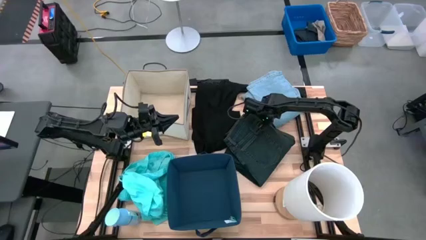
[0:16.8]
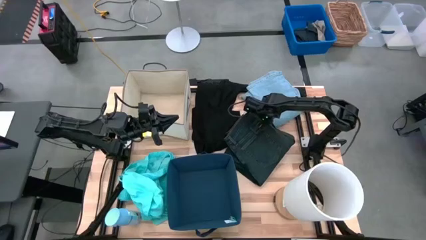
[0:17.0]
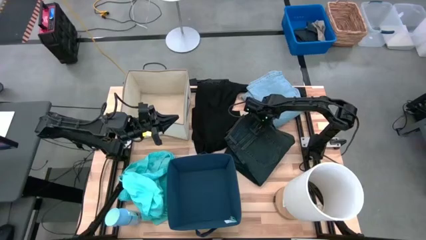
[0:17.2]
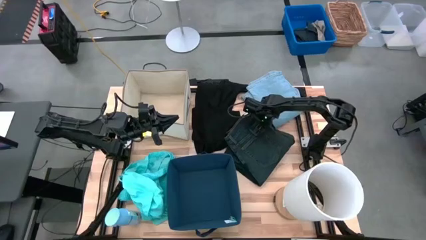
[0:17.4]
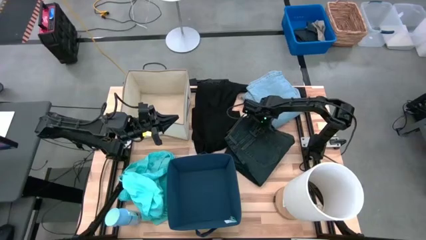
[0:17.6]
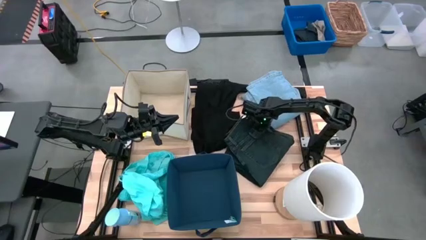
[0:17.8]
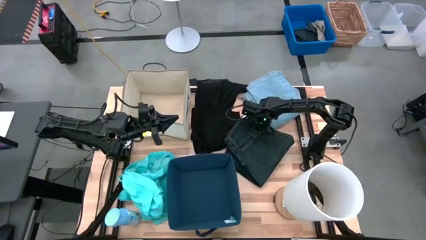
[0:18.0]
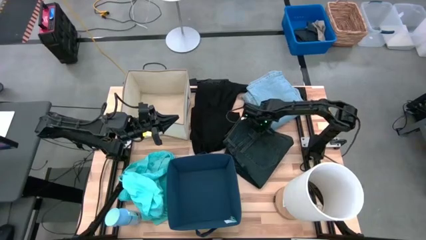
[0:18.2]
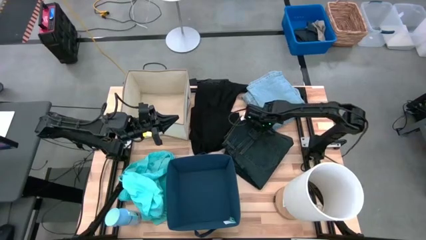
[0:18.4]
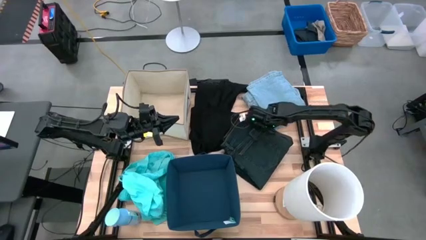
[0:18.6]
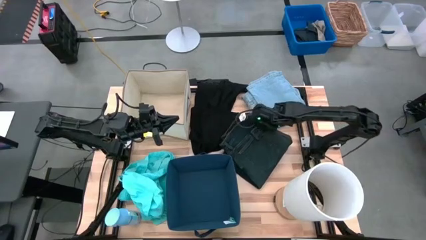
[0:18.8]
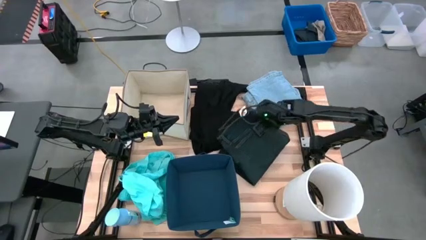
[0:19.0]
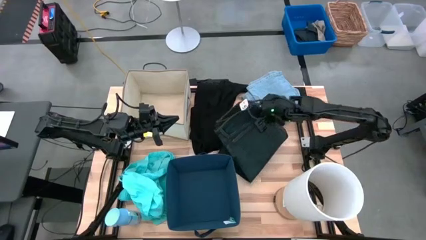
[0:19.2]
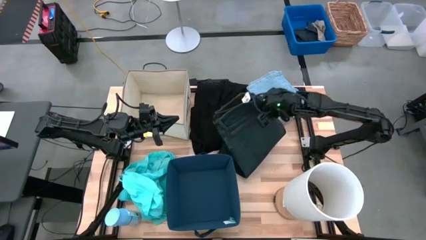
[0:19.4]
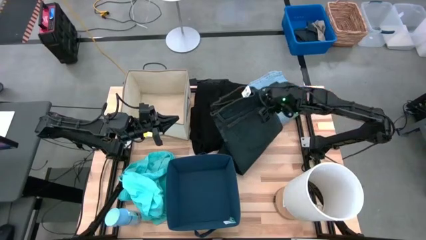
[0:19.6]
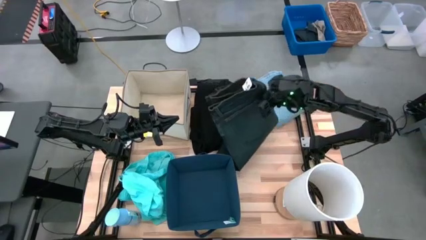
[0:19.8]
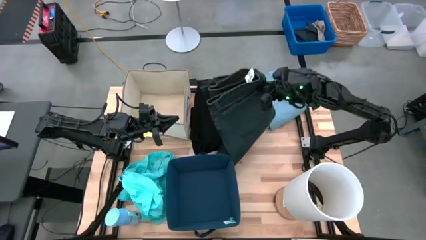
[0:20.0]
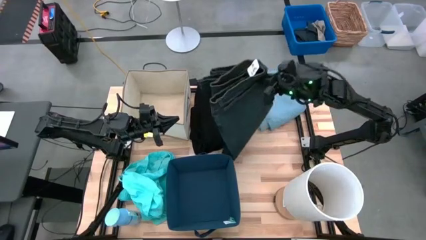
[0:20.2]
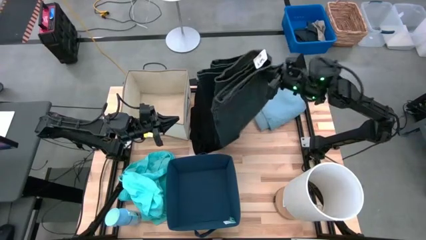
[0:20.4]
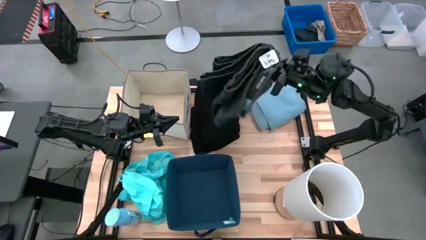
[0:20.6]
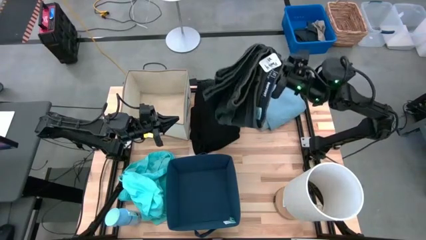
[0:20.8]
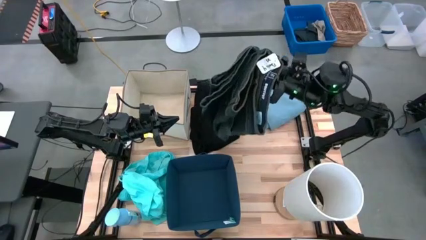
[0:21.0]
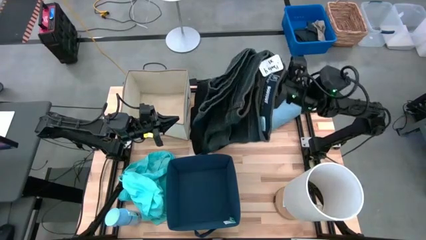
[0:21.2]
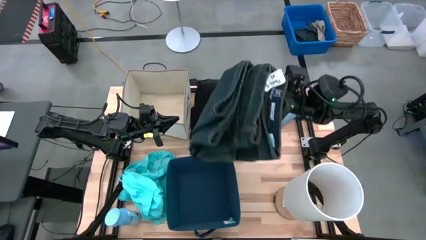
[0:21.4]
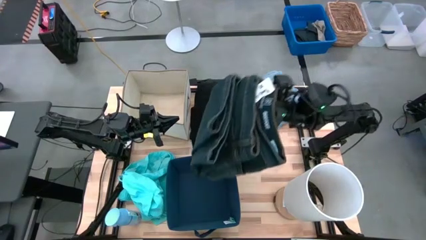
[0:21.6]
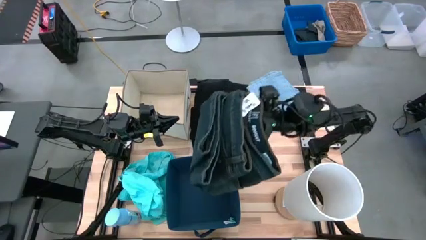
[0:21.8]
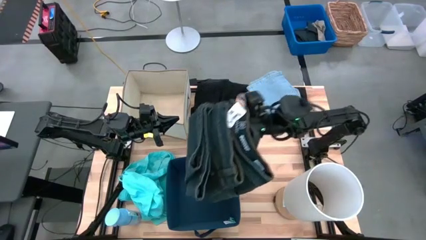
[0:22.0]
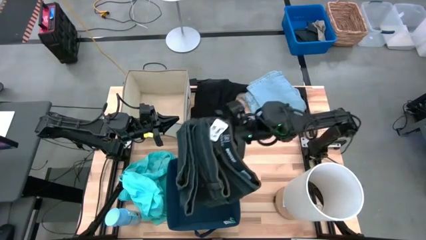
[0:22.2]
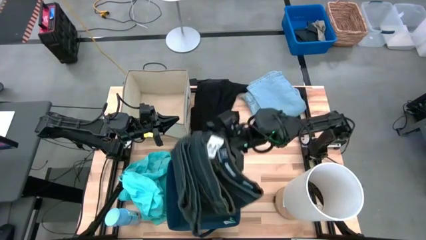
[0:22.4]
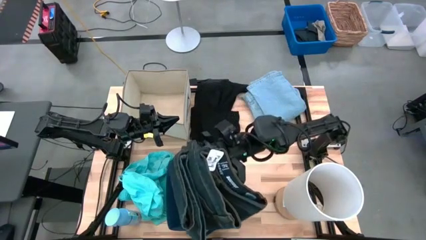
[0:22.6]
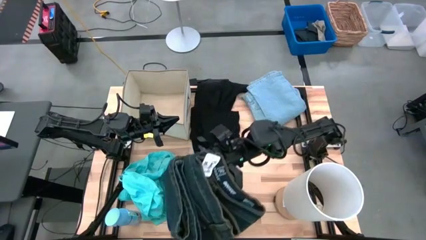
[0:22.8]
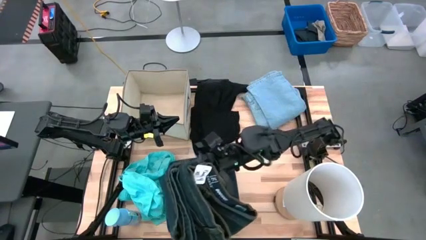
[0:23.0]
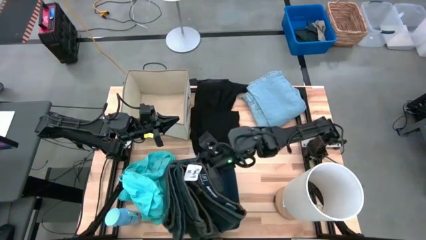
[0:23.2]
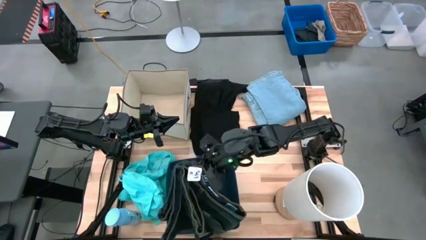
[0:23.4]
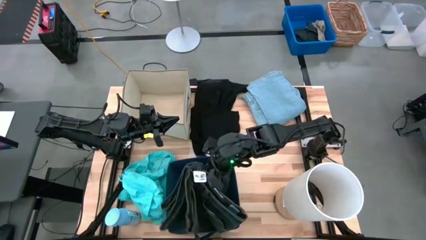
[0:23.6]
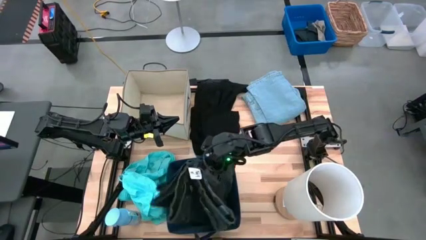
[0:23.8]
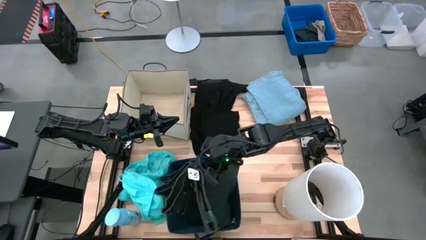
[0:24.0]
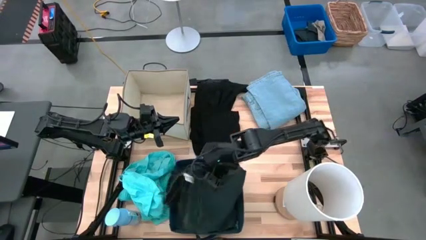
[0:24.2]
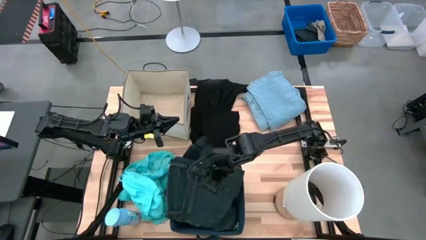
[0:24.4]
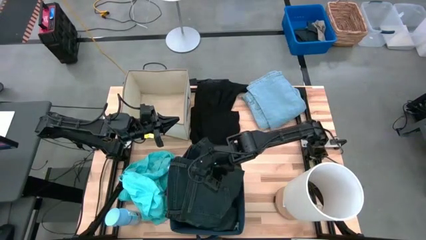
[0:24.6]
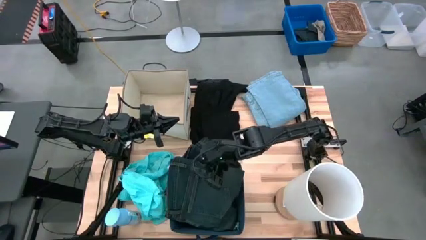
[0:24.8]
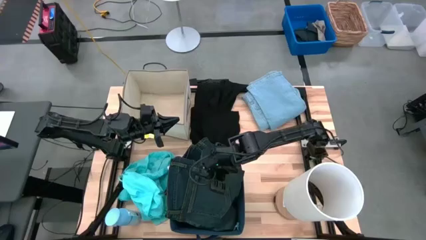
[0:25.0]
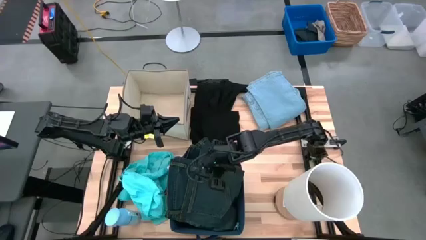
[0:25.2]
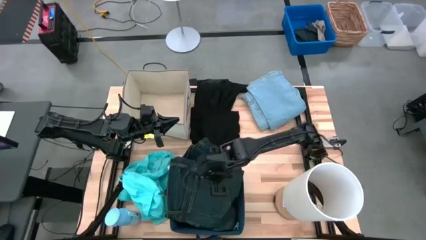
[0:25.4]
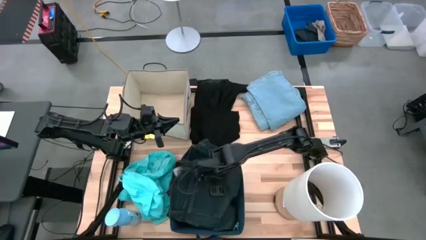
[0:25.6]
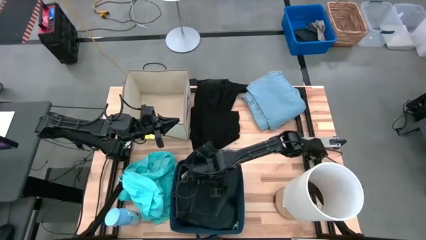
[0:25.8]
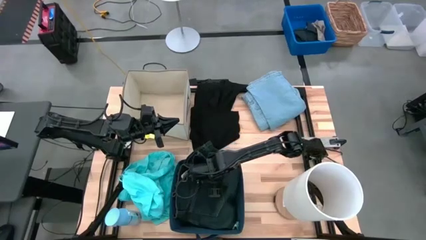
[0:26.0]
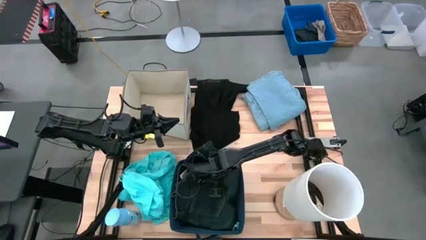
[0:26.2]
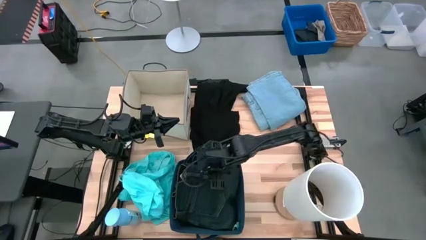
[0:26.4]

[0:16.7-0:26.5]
Task: Sort clothes
Put the black denim jeans into the blue laundry bin

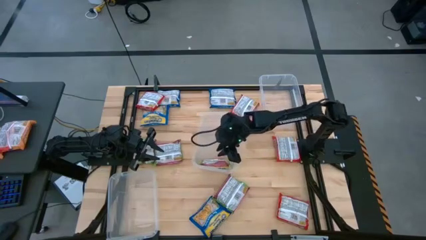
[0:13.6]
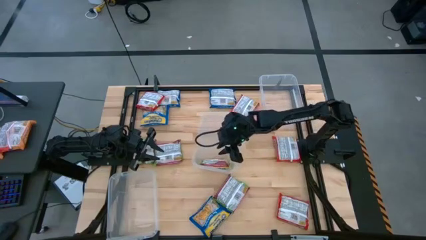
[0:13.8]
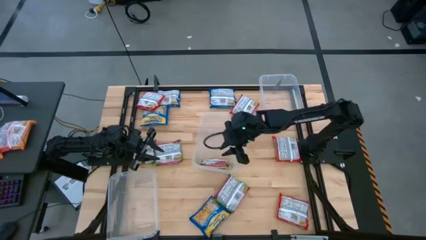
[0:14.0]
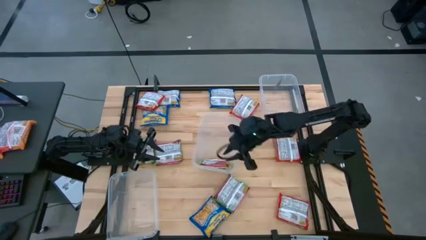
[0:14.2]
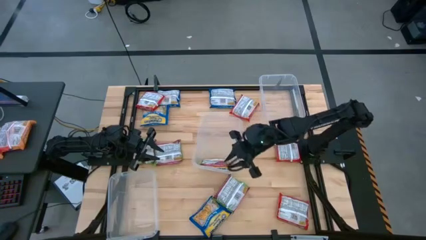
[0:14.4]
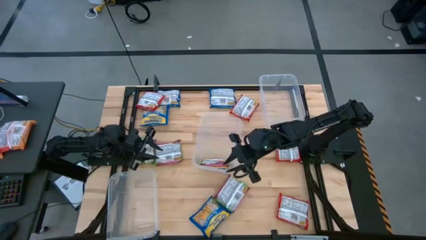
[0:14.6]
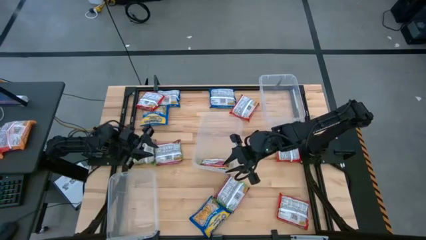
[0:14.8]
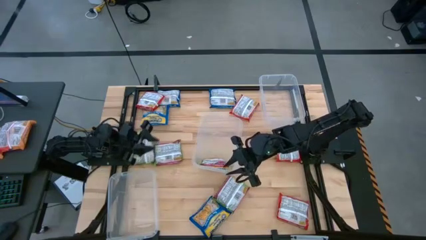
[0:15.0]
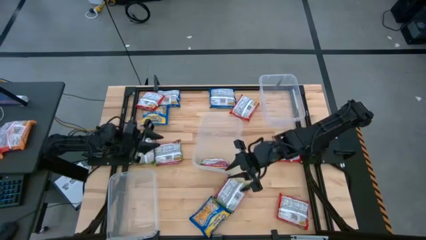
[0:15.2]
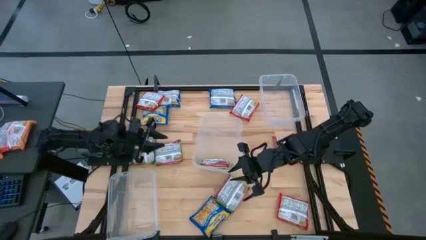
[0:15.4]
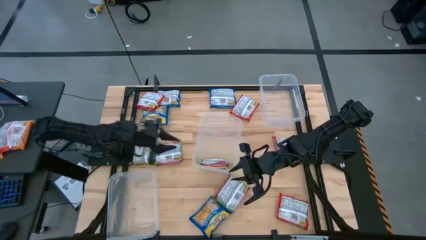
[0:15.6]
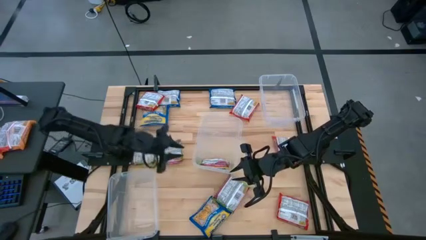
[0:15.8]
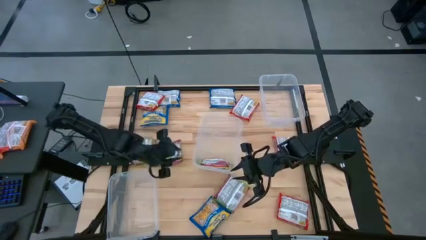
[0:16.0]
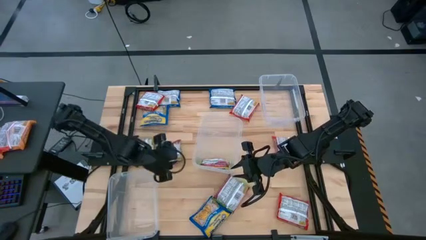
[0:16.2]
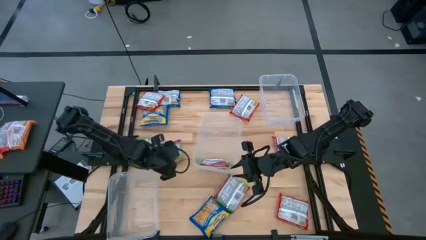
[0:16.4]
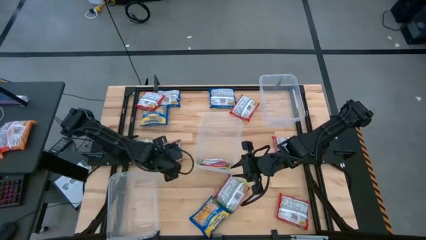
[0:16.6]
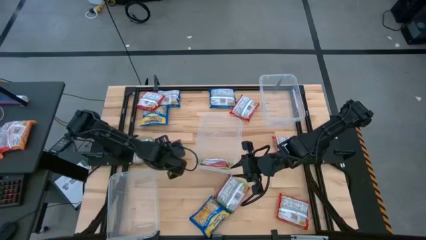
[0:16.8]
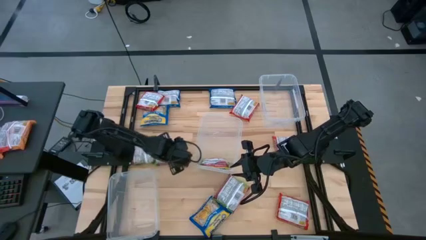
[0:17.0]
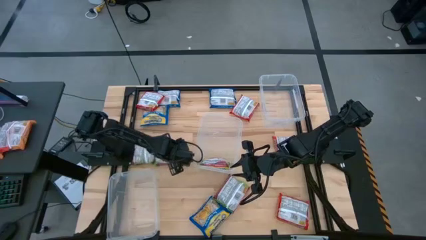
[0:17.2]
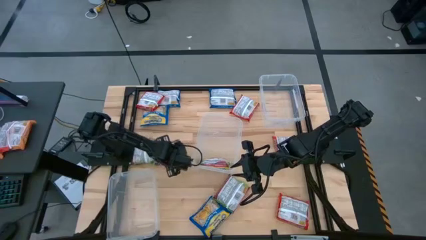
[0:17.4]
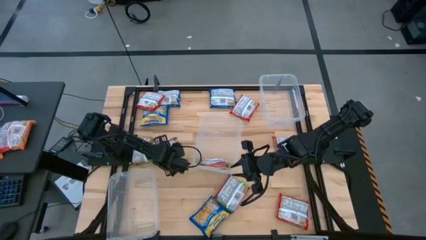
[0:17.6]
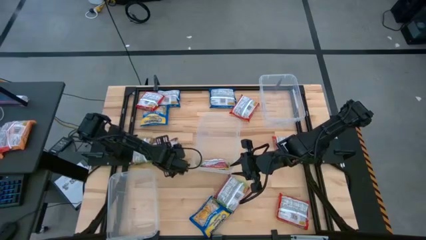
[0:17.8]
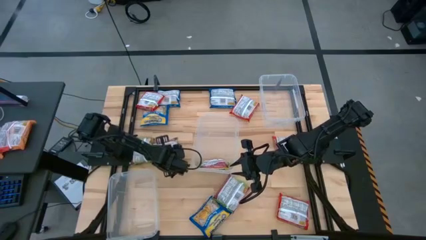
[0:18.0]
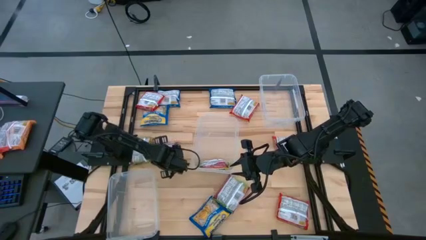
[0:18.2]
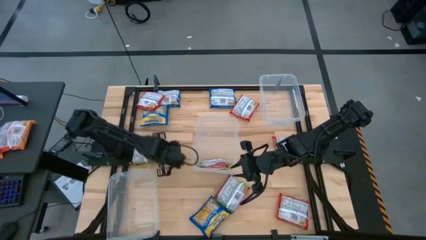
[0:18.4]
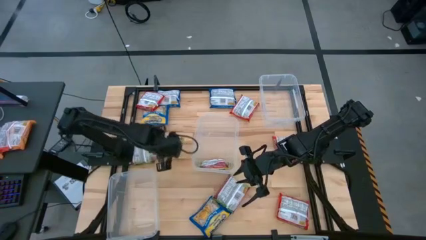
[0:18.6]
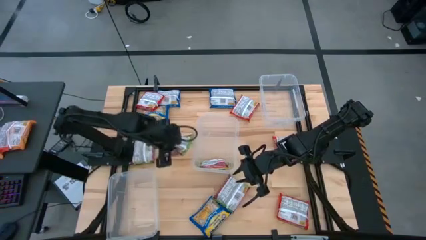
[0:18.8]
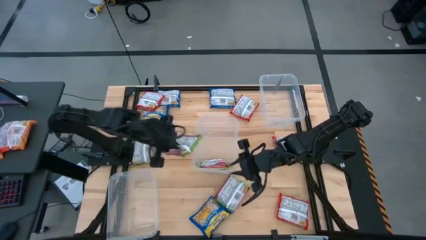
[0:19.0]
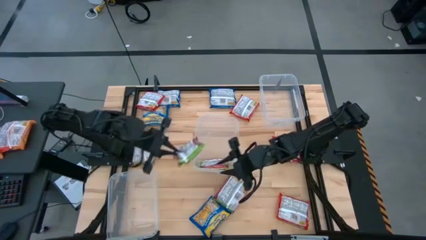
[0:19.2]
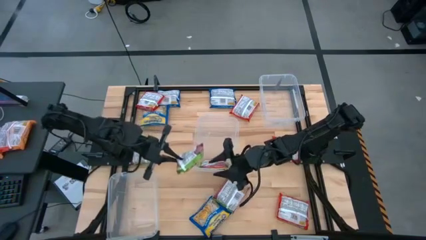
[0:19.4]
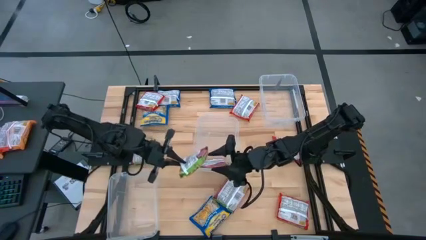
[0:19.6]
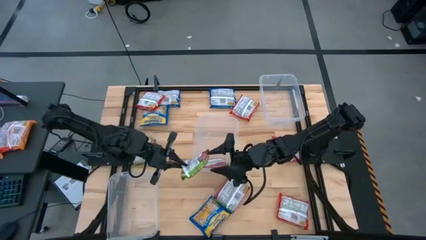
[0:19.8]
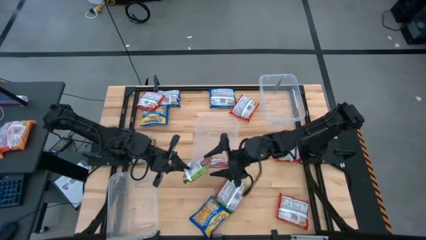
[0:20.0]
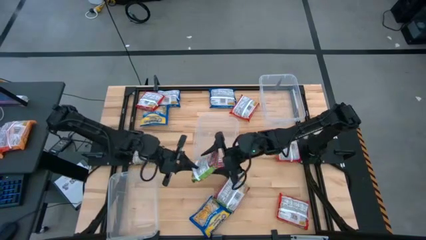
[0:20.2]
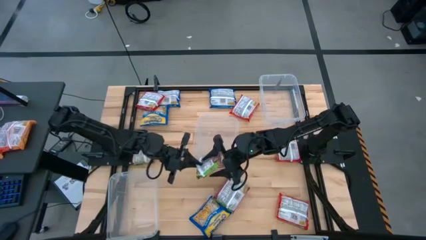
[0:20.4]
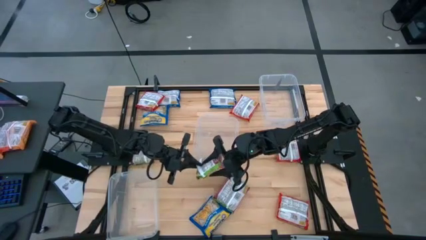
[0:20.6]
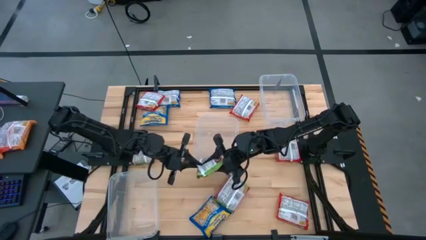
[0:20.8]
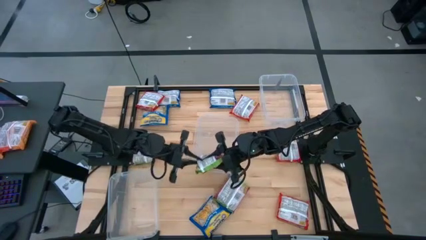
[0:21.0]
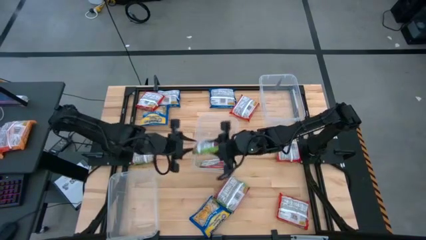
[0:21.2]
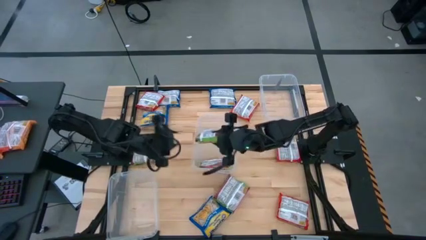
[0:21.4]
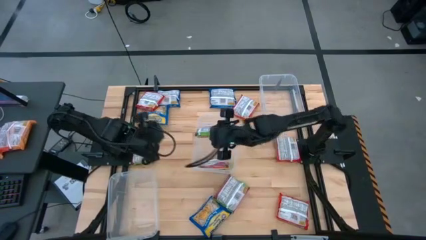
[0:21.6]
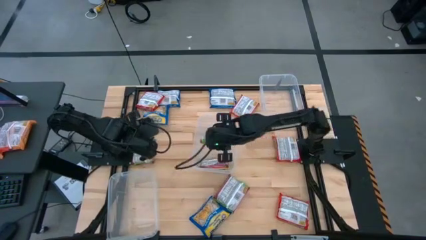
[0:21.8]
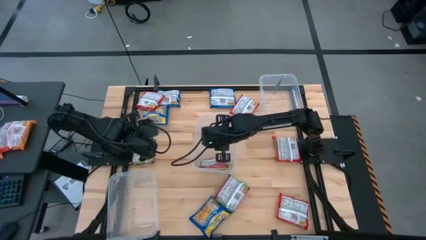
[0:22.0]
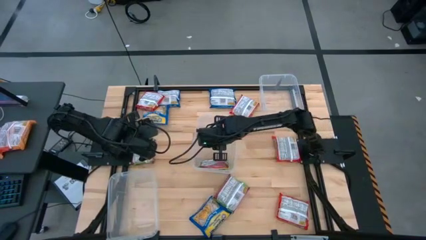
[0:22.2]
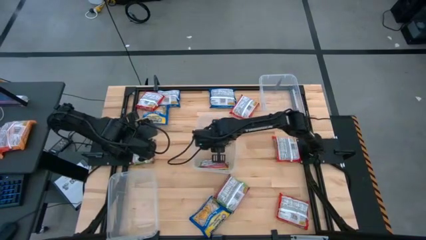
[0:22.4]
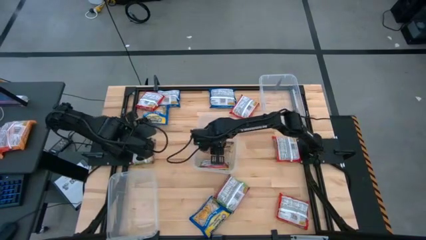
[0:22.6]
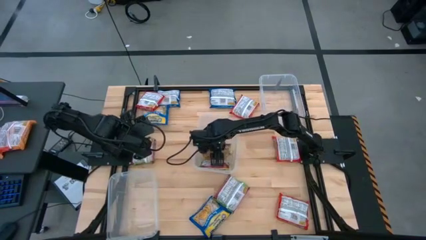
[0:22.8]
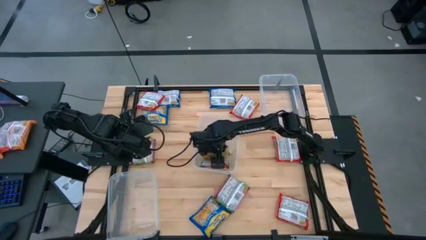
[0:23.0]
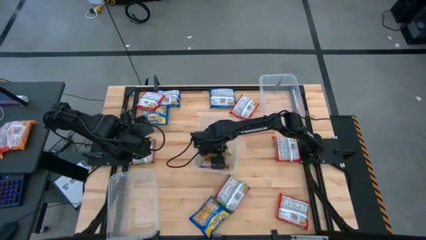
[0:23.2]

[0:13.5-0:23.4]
Task: Sort Maruchan noodles
Put the green noodle pack into the middle transparent container
